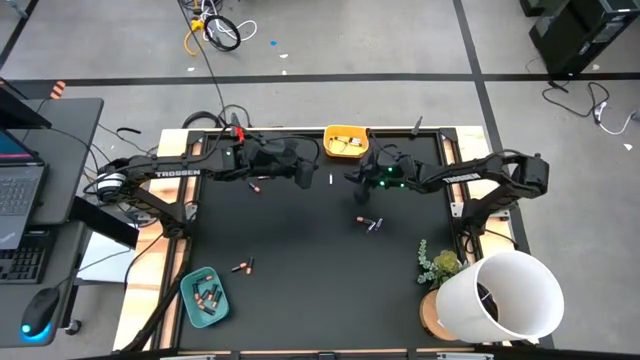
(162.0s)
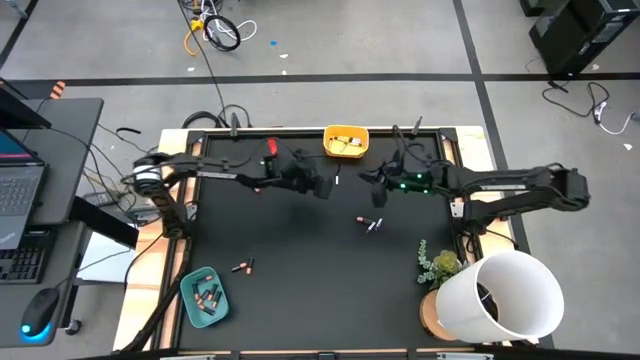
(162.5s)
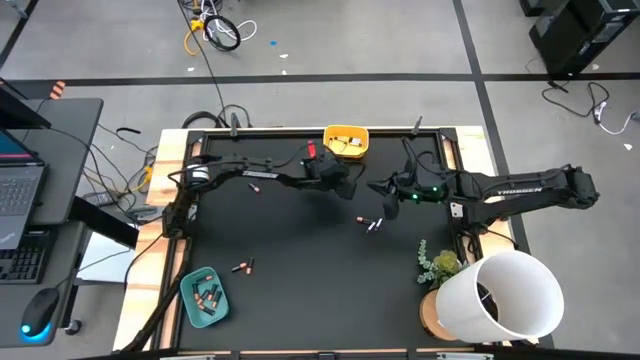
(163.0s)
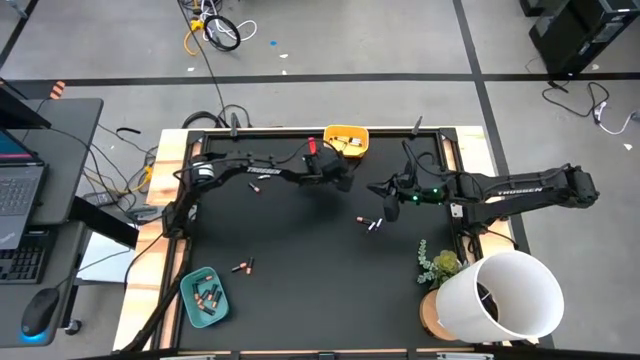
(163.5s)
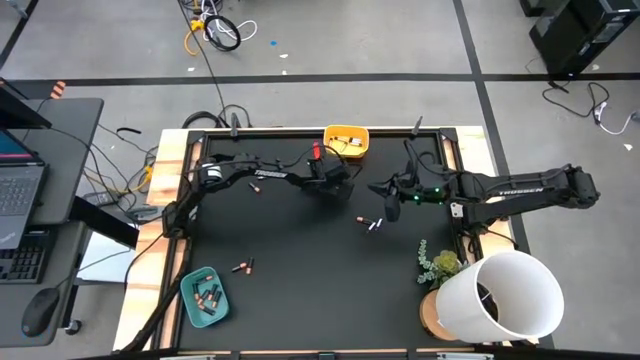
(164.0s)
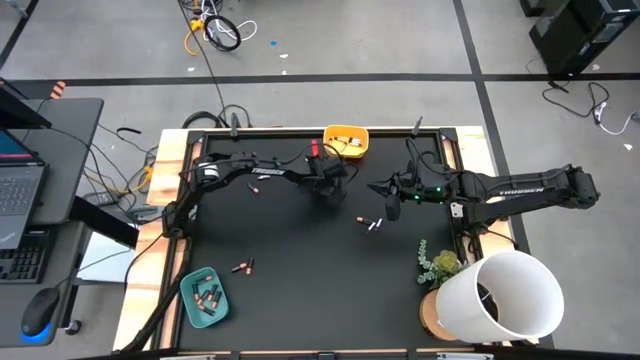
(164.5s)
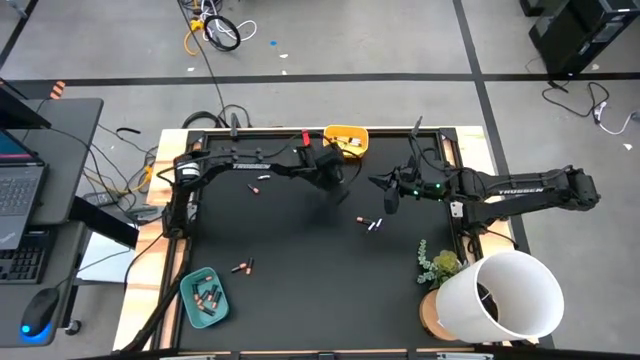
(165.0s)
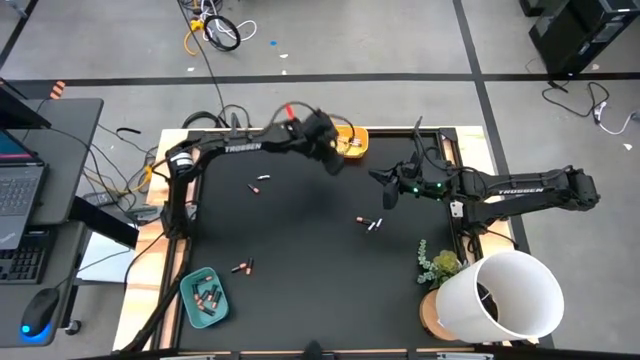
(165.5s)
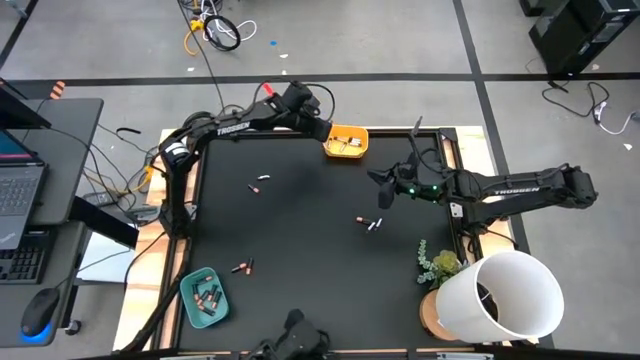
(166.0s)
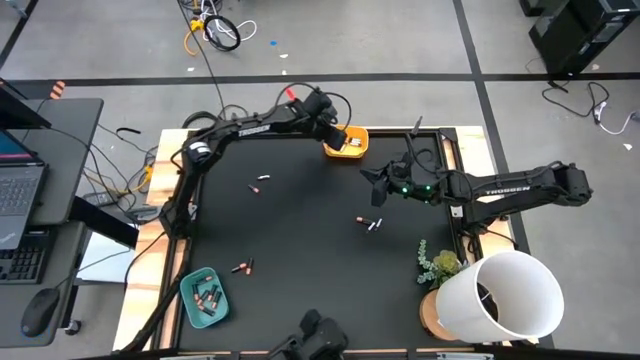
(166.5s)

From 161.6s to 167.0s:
Task: Sort batteries
Put the silver battery into the yellow bin

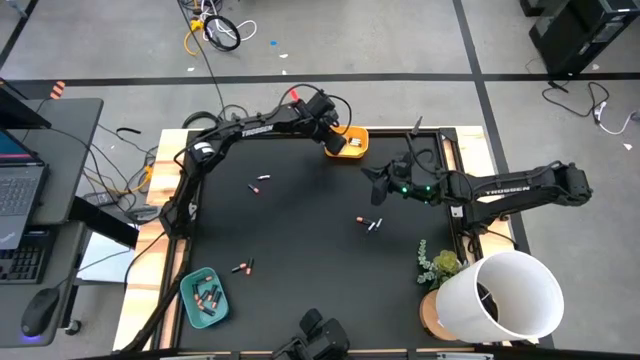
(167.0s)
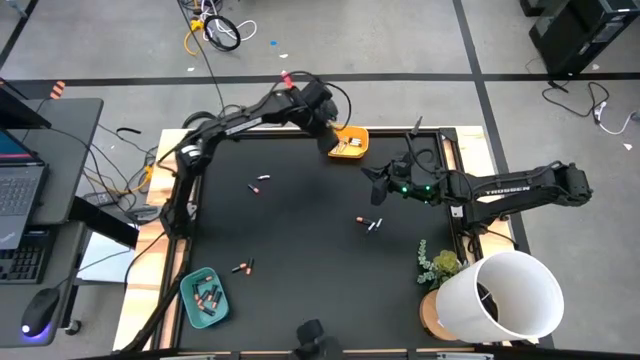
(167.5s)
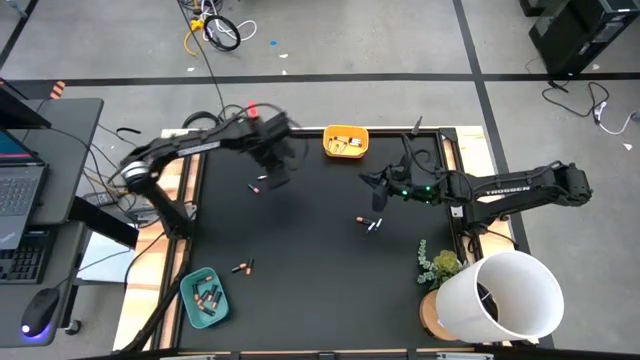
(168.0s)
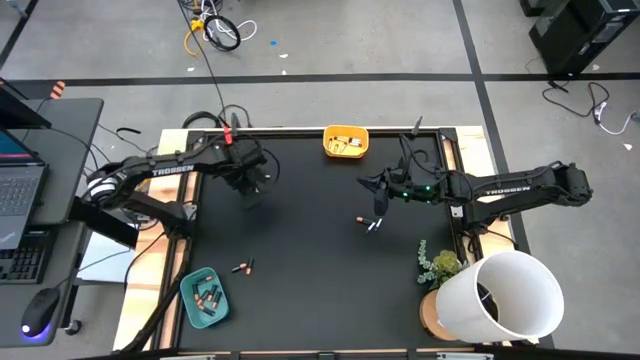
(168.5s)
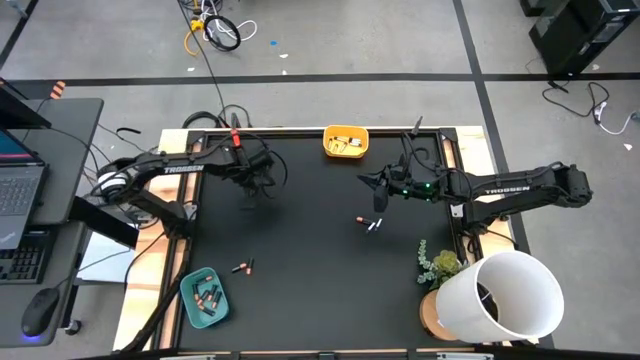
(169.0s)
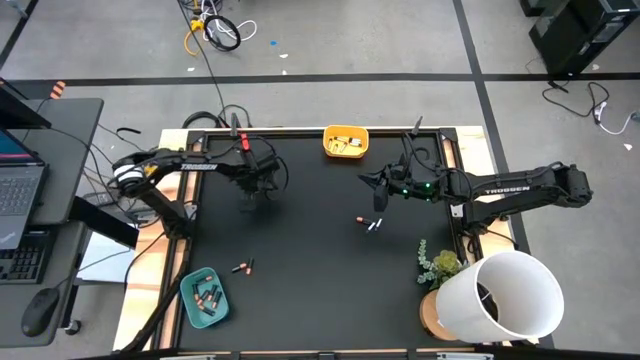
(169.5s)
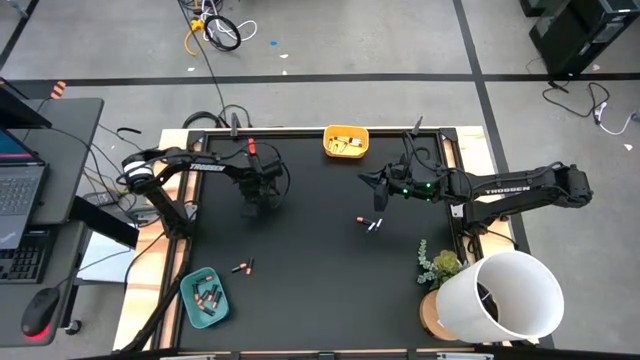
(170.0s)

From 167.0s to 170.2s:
Put the black battery into the green bin

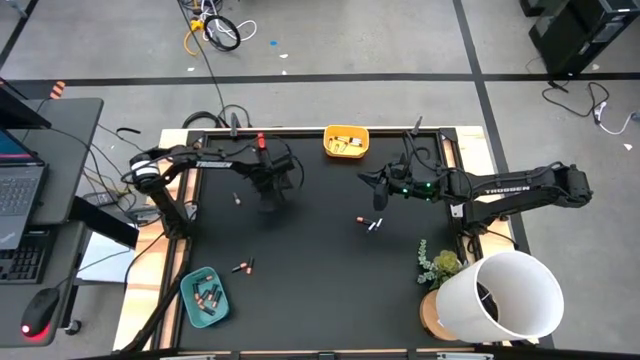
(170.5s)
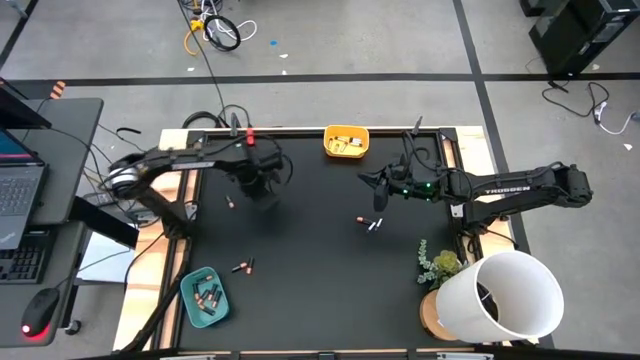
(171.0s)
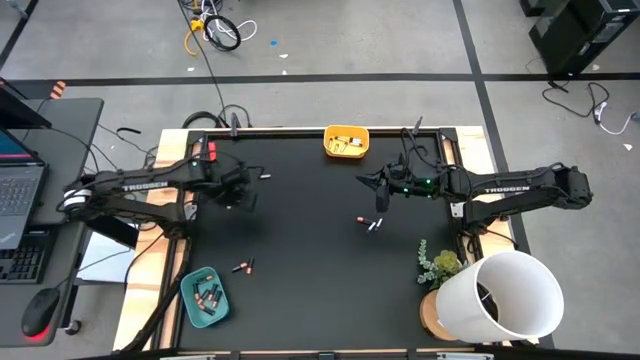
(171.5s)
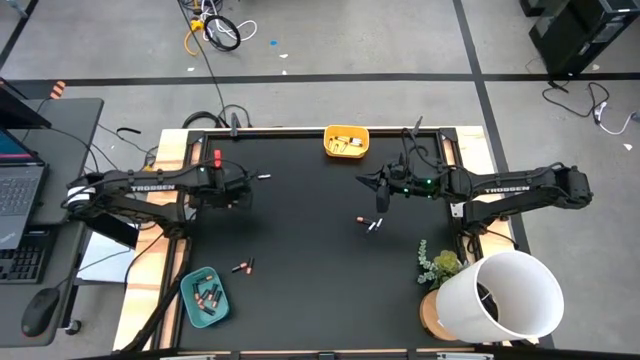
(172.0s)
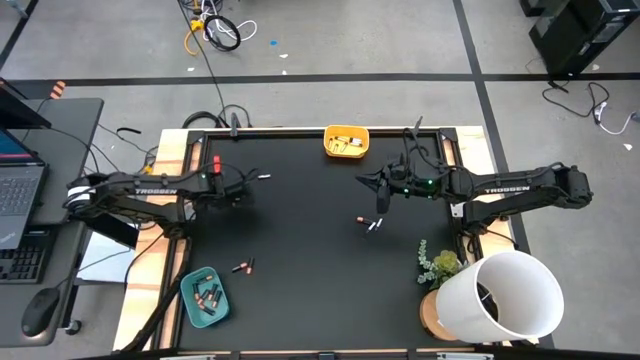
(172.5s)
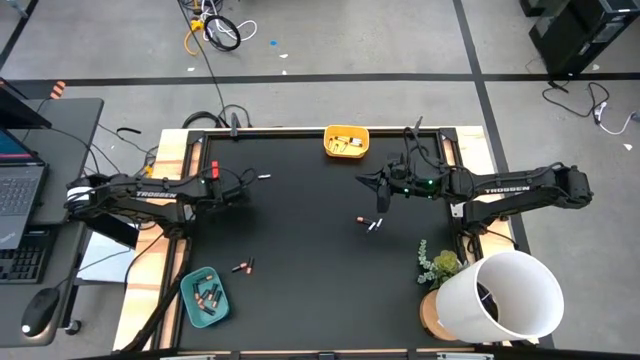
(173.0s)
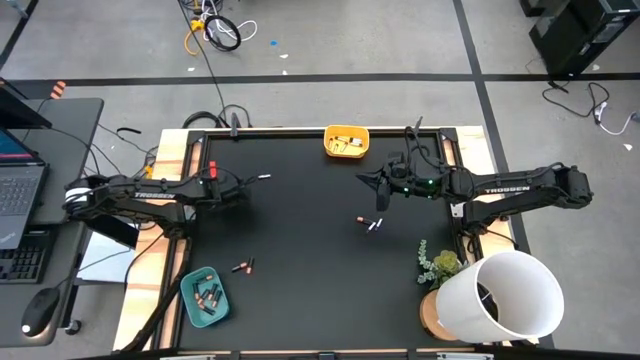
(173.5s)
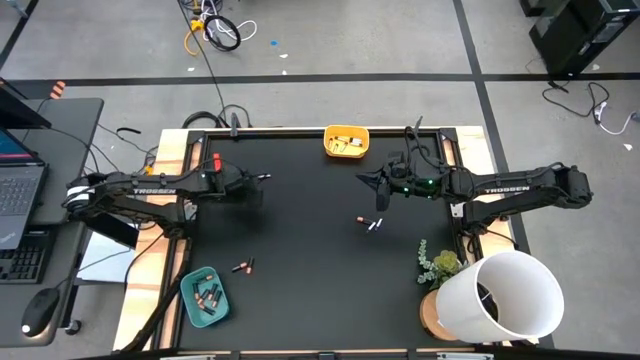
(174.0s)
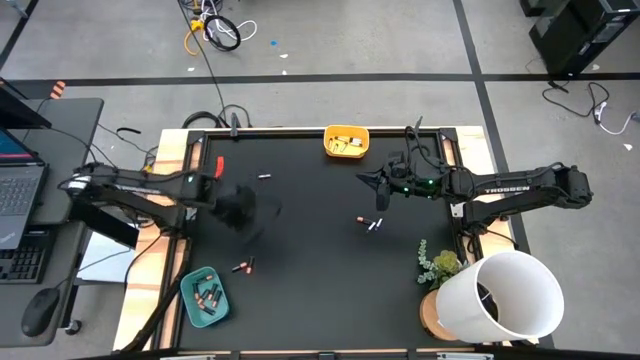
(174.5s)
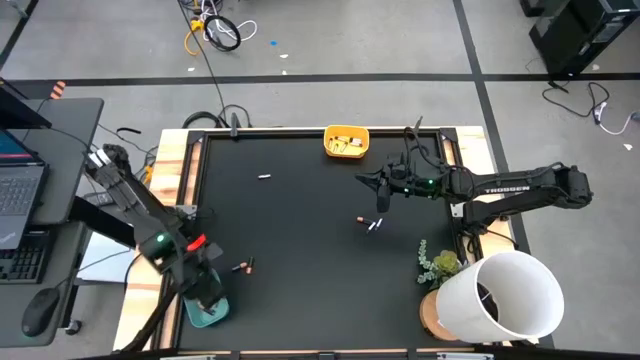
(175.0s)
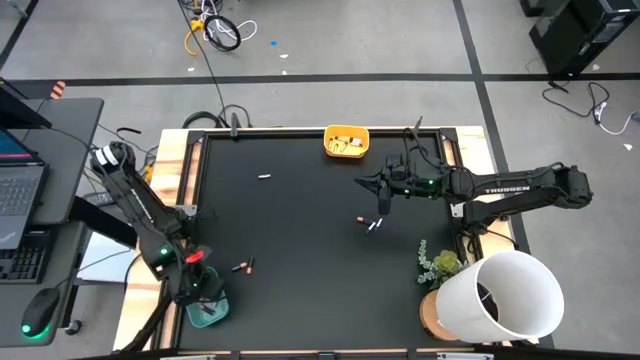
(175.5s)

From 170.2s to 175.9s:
Put the black battery into the green bin

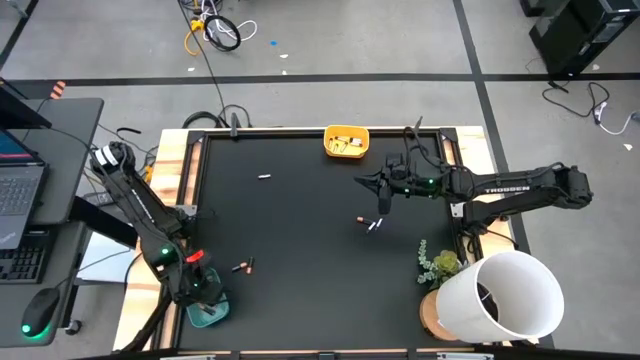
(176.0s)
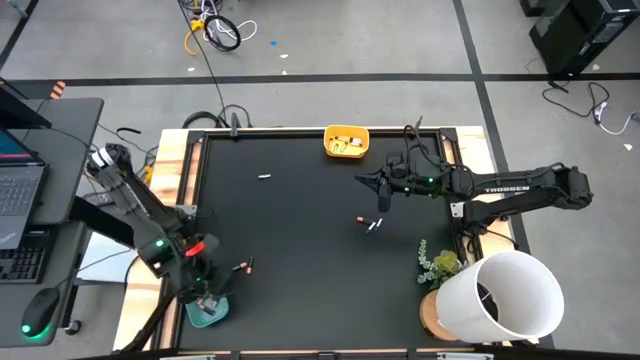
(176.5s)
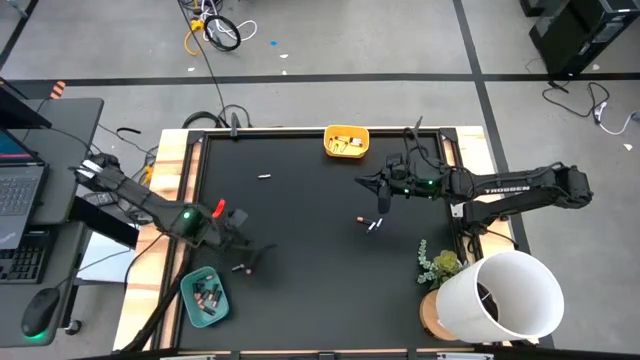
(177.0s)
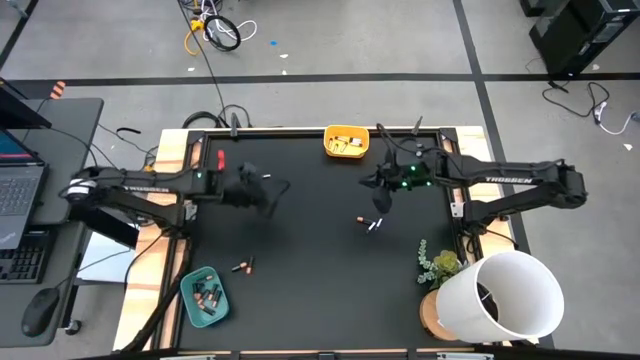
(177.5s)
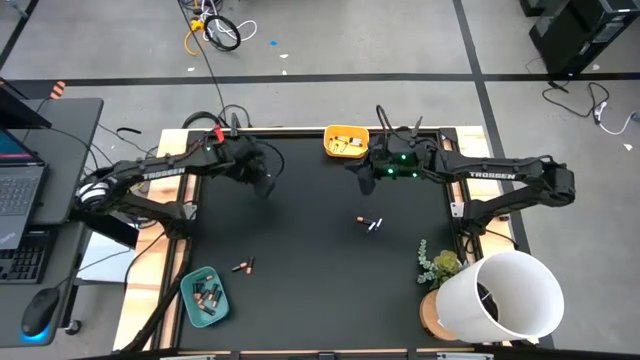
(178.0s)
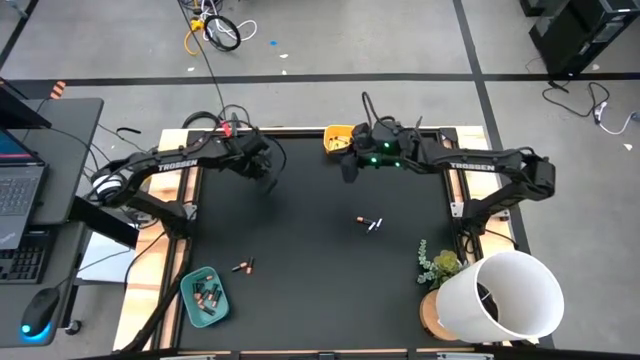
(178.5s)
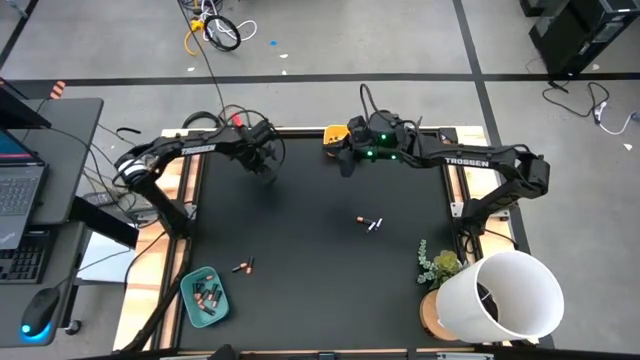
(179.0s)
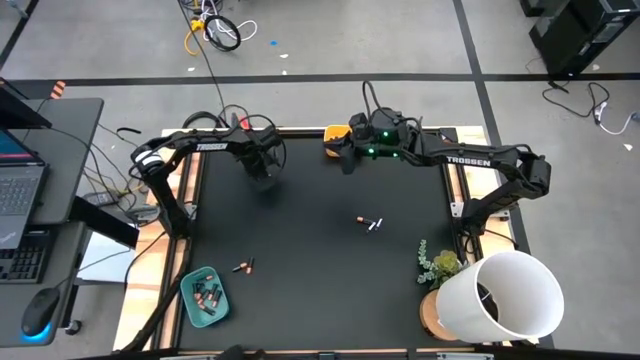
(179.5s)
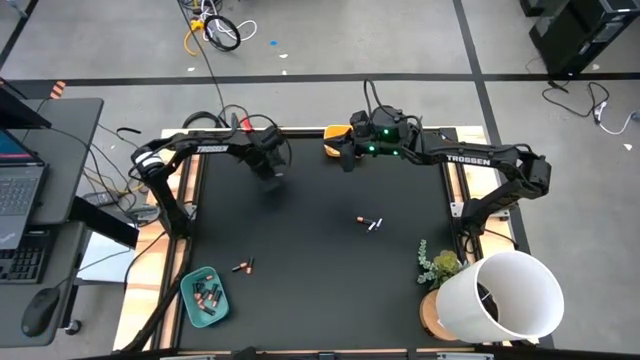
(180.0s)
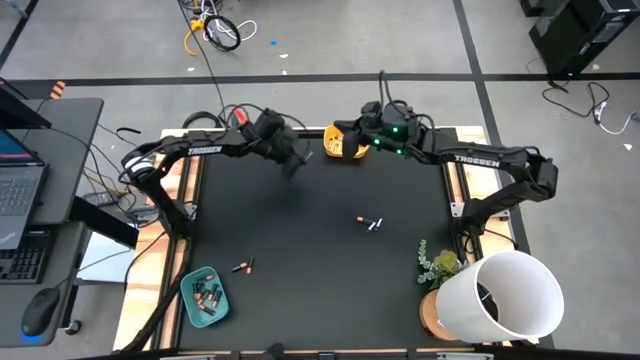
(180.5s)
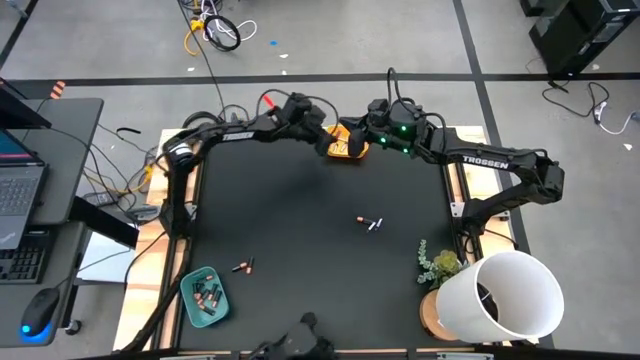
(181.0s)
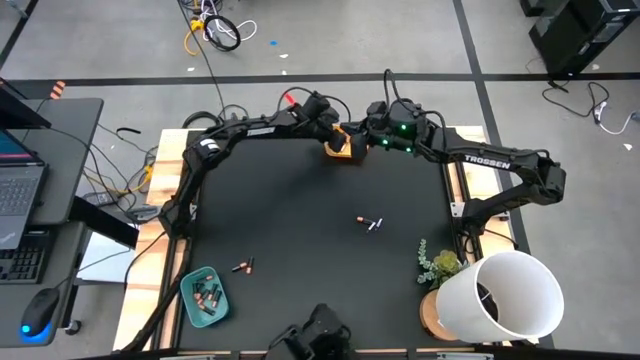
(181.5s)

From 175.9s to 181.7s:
Put the silver battery into the yellow bin

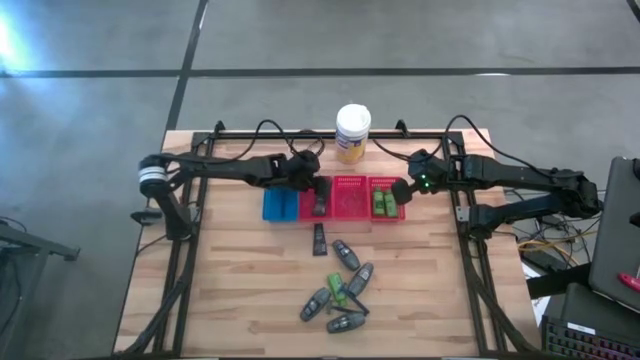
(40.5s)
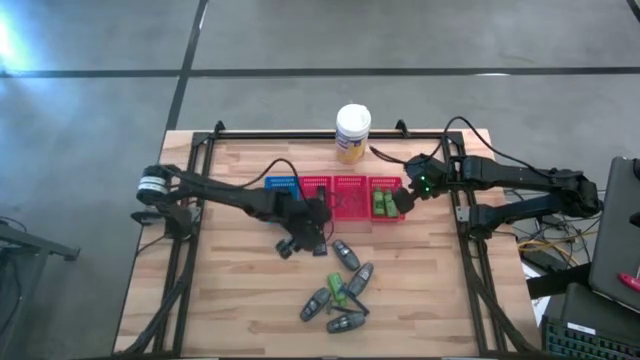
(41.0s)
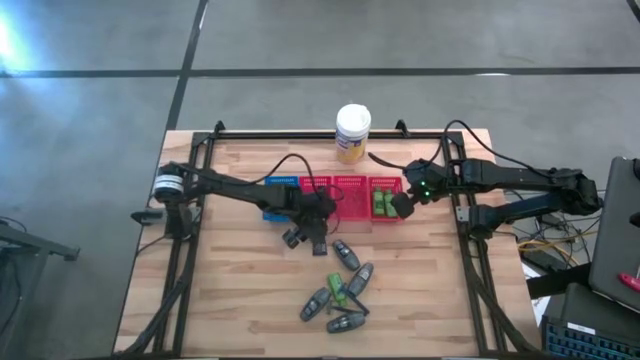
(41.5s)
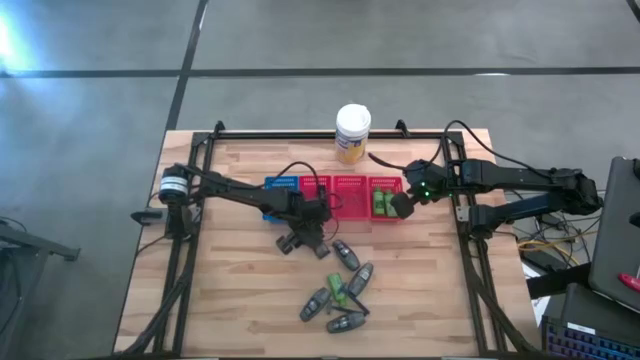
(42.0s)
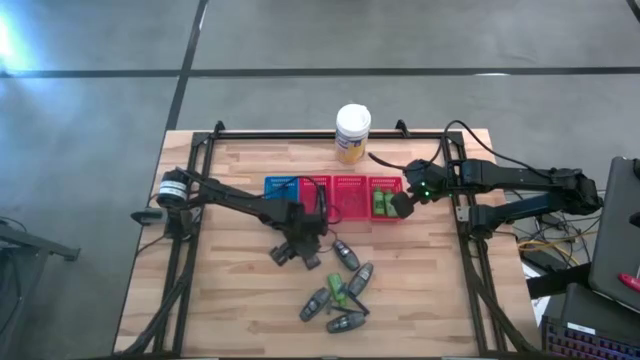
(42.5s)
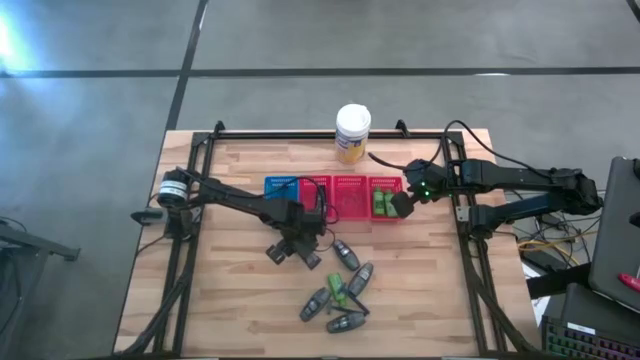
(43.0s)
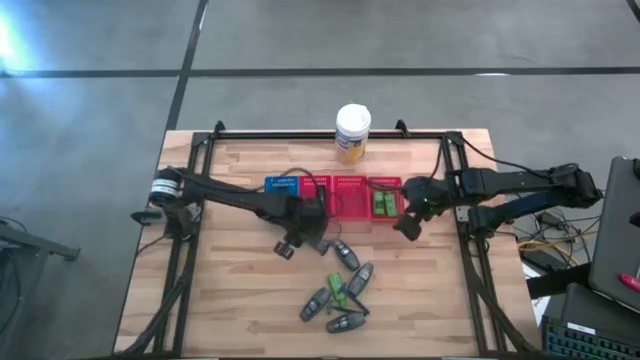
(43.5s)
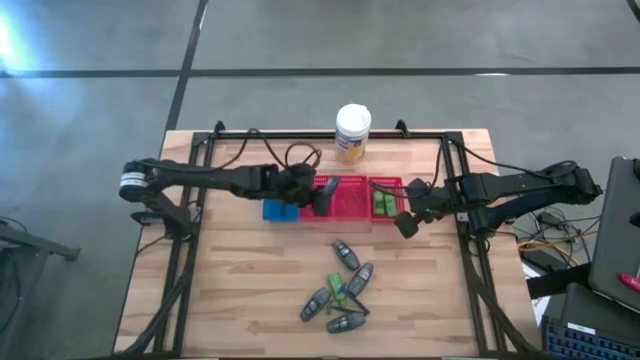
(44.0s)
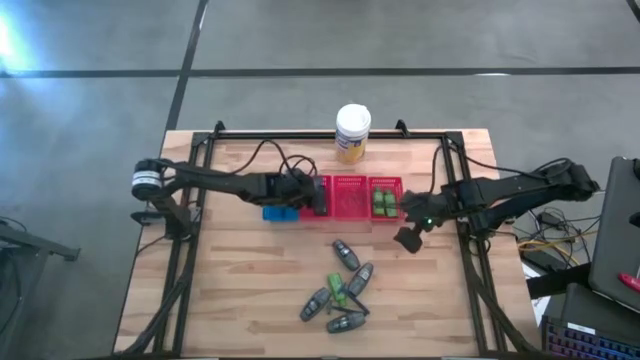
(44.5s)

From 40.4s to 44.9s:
Task: Pick & Place Travel size toiletries
Put the blue shave cream into the left red bin
